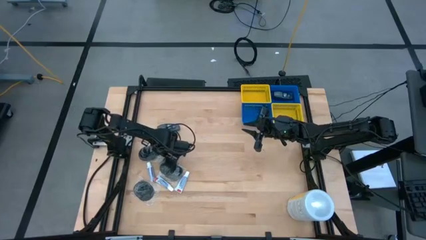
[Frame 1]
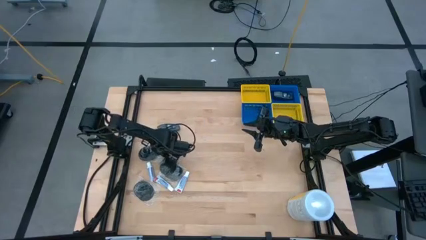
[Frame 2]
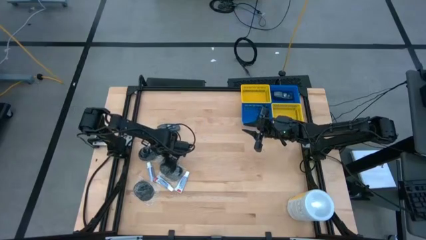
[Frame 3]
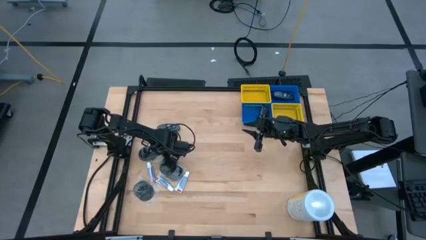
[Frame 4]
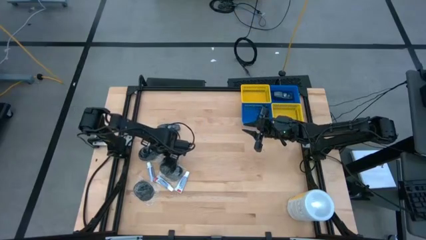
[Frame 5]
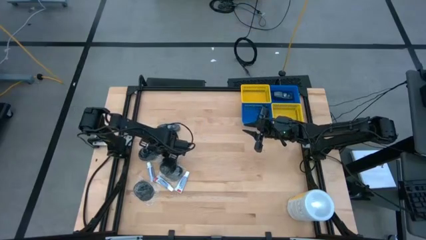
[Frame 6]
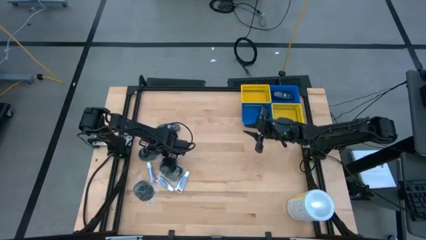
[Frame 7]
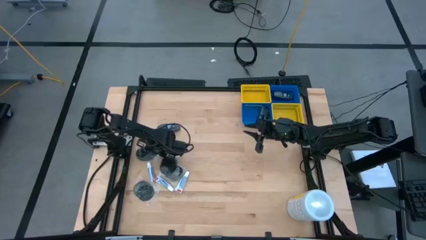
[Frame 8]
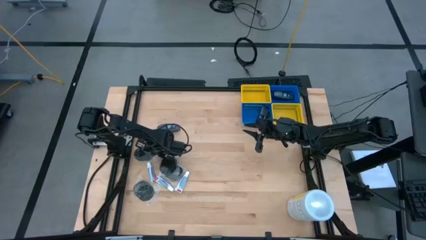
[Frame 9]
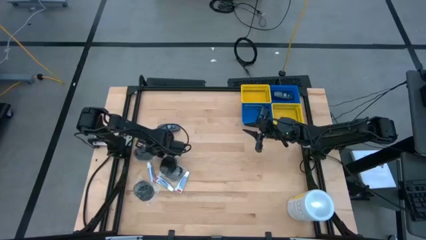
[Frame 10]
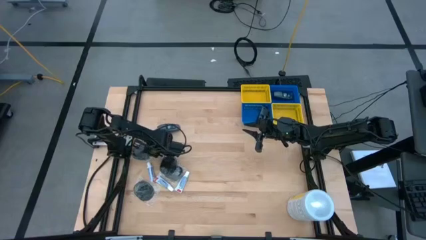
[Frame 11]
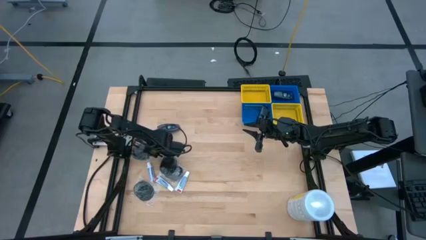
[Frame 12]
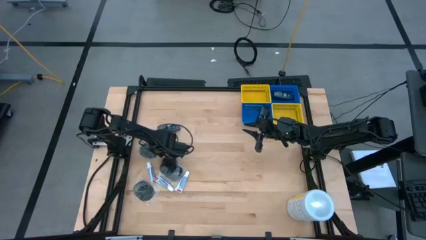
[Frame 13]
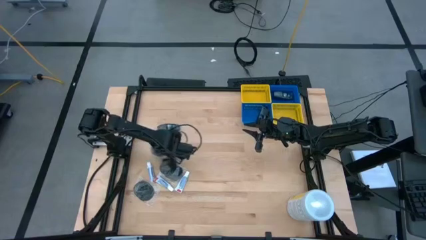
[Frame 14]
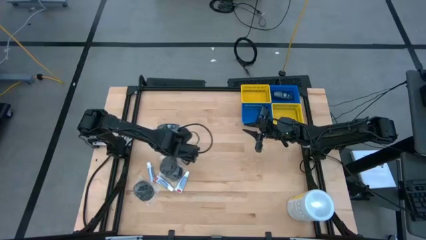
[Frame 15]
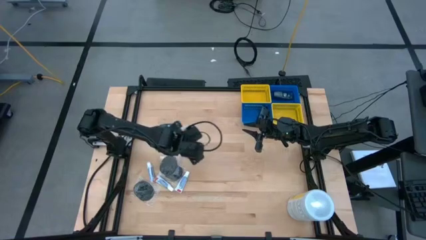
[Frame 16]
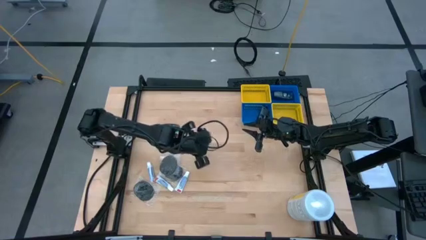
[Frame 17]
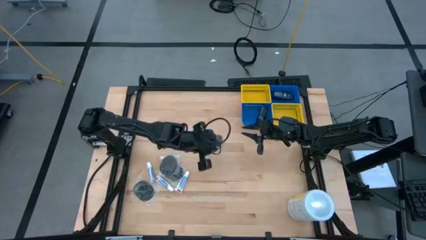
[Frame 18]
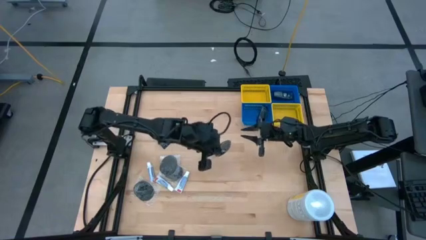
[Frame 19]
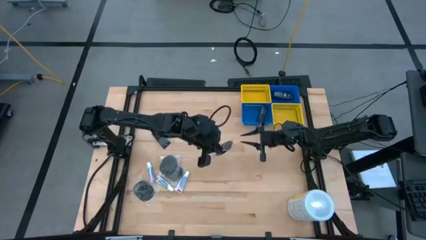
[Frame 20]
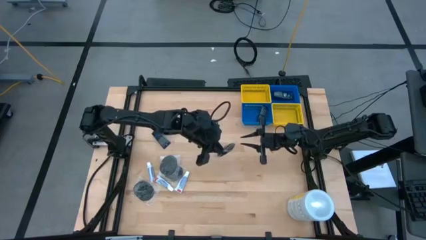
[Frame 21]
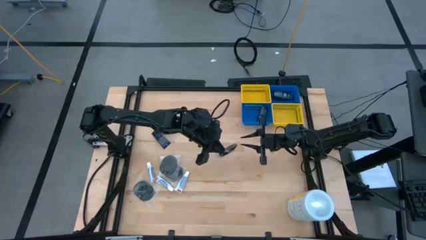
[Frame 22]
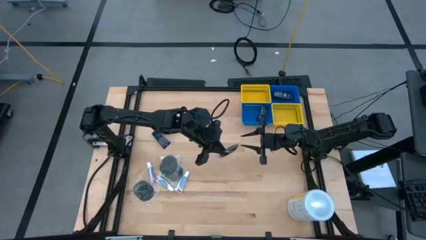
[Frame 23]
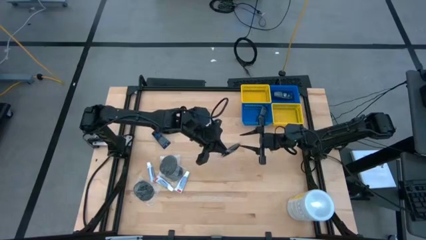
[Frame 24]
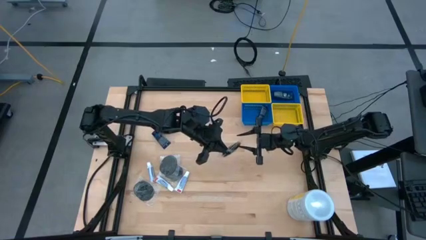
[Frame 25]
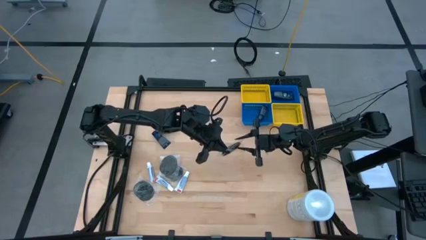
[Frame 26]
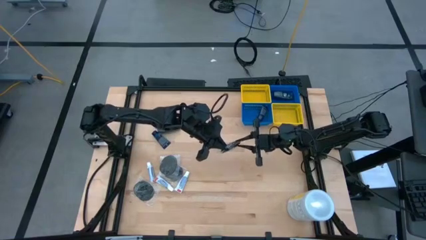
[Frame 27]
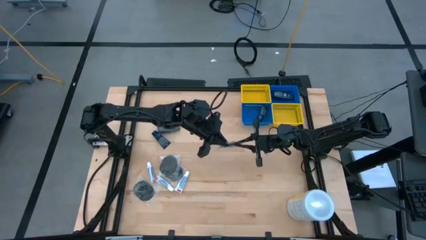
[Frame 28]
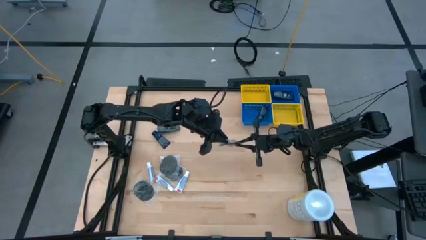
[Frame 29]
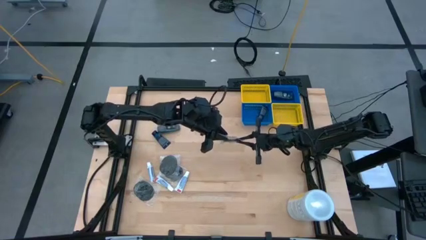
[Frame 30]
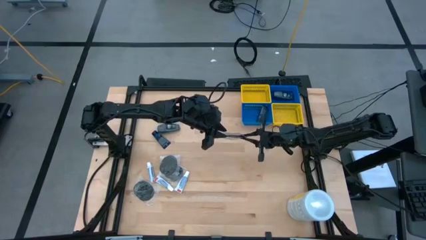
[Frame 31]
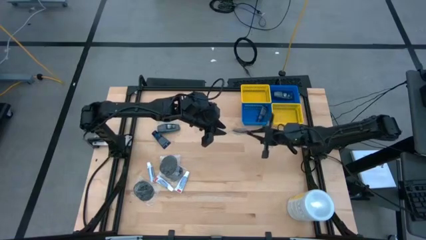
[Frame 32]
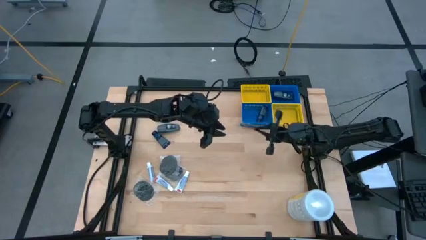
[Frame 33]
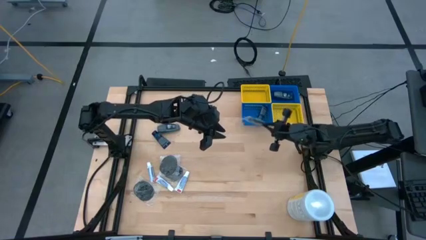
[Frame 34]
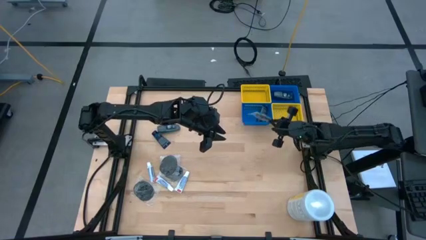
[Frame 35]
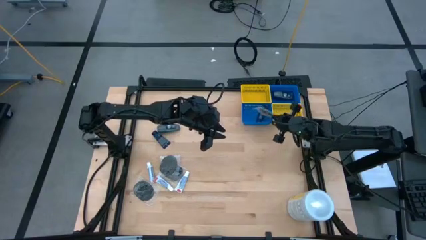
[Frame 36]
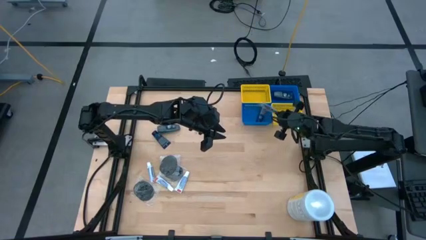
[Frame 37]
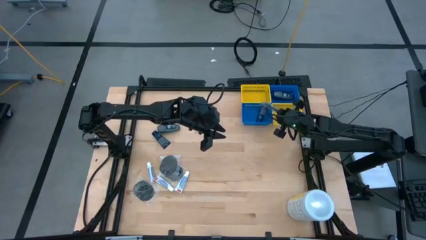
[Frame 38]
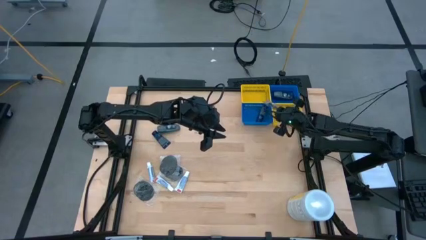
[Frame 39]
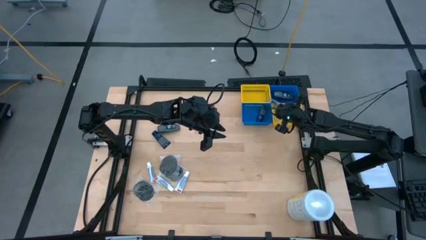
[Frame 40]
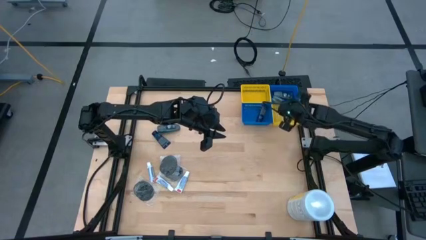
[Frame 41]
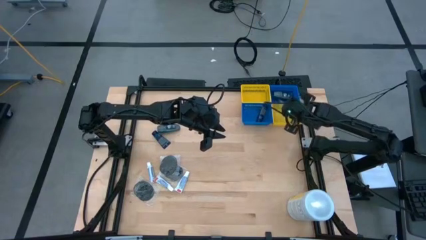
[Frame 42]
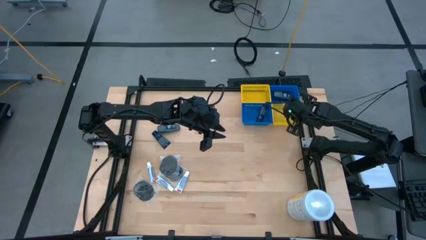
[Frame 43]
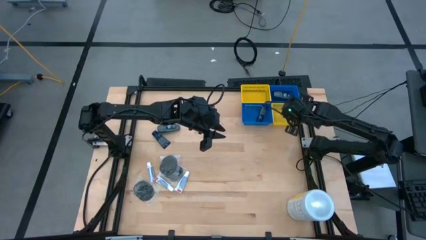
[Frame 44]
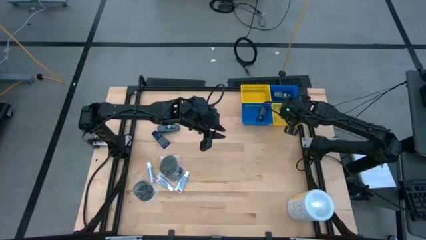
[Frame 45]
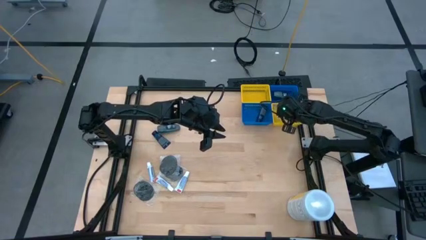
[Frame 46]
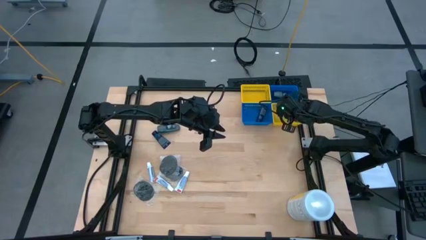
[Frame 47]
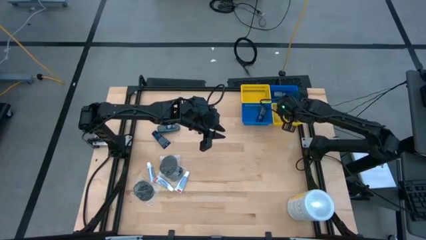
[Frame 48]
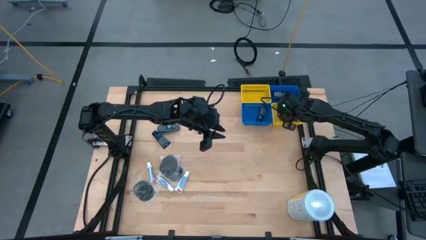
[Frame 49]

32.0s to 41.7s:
Task: Pick & Place Travel size toiletries
Put the black hairbrush into the bottom yellow basket
